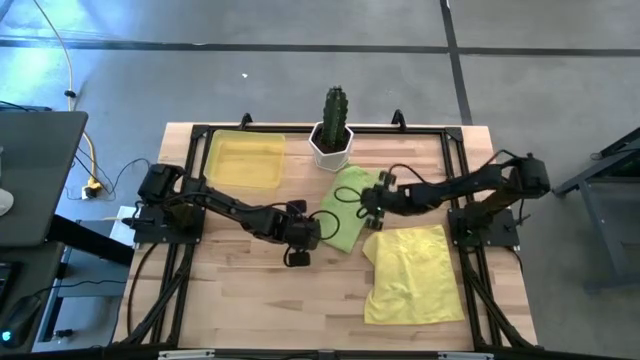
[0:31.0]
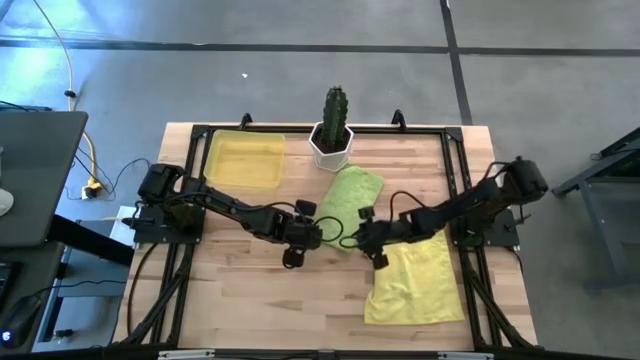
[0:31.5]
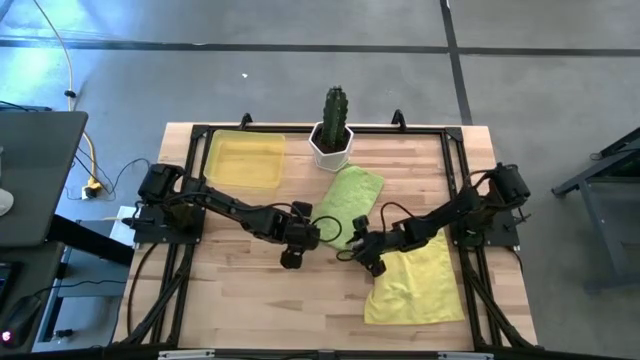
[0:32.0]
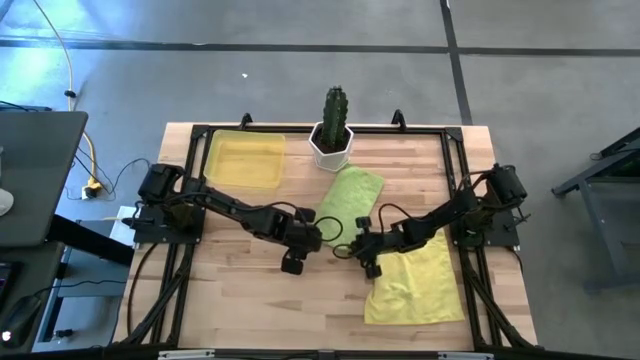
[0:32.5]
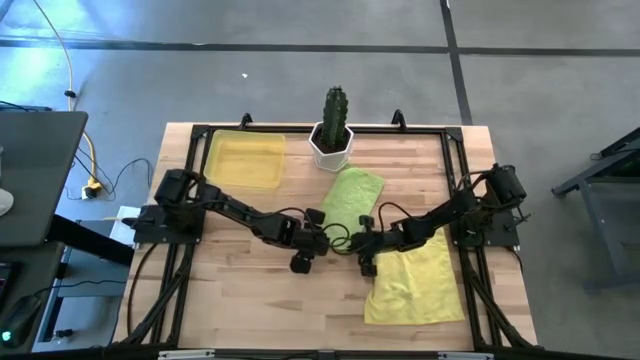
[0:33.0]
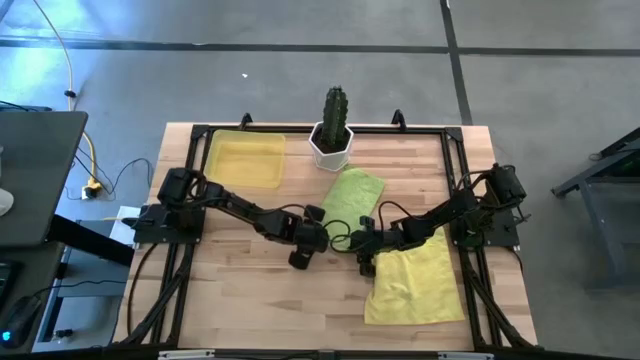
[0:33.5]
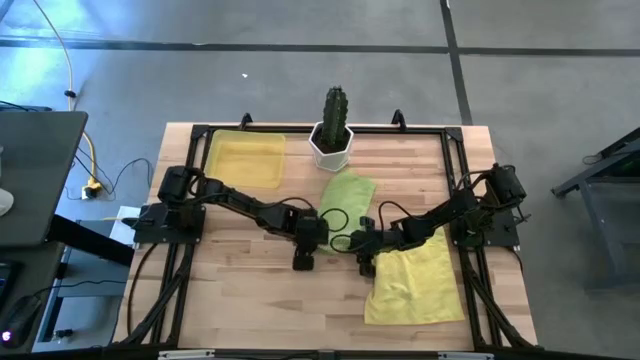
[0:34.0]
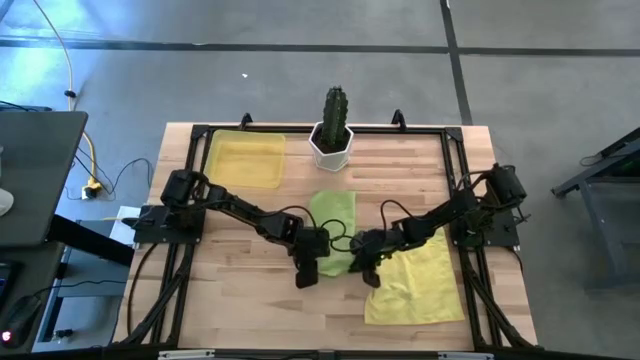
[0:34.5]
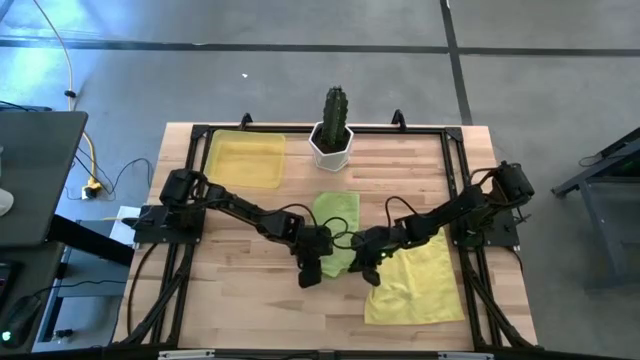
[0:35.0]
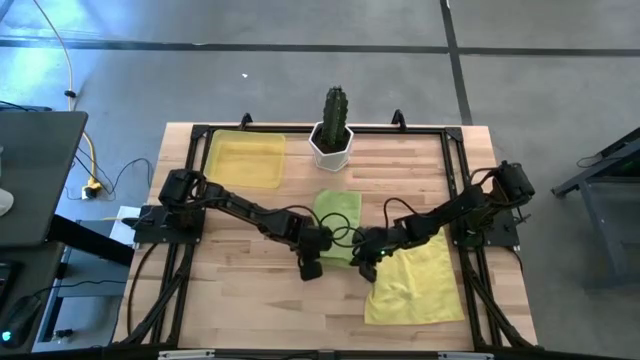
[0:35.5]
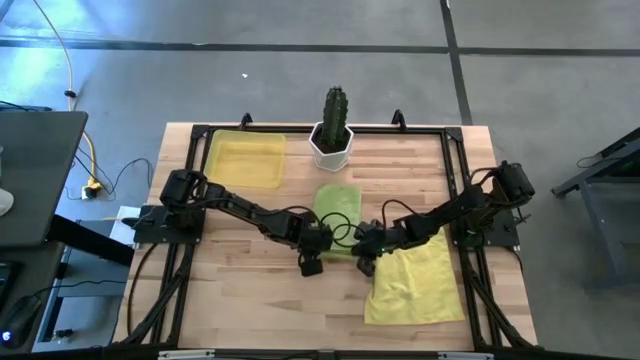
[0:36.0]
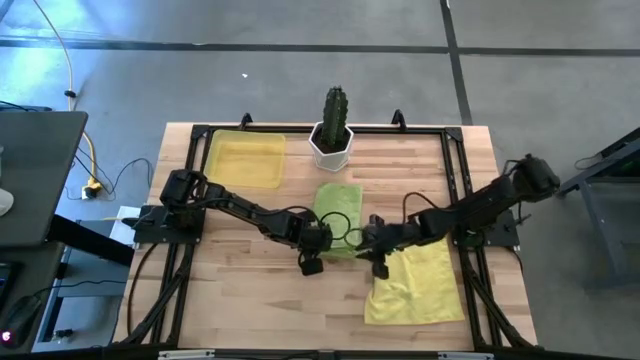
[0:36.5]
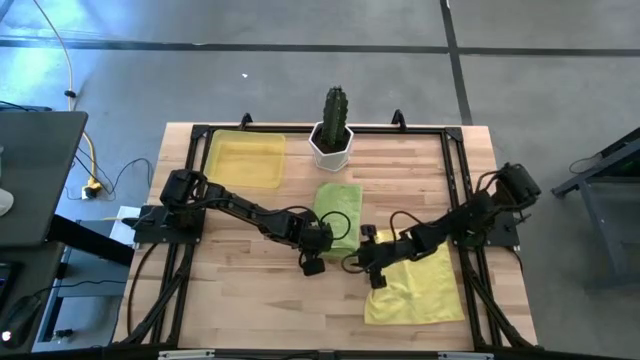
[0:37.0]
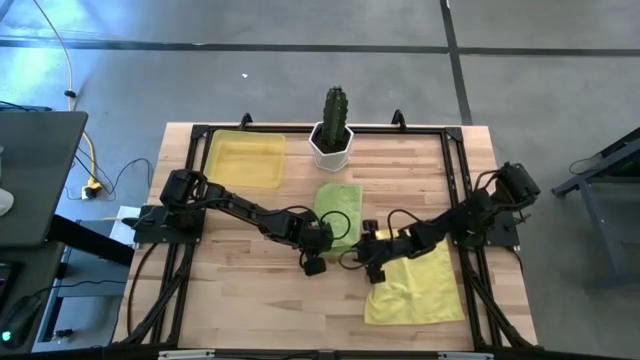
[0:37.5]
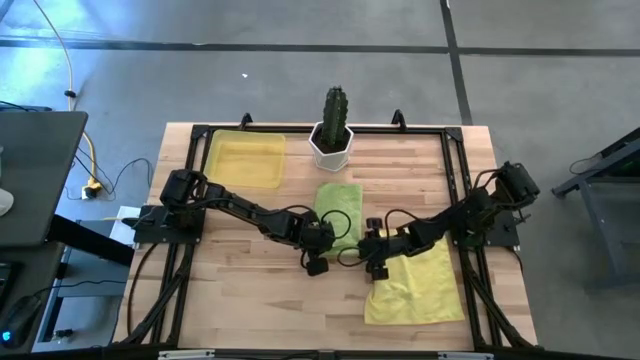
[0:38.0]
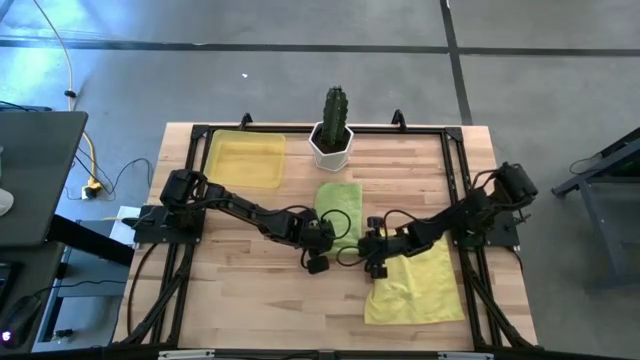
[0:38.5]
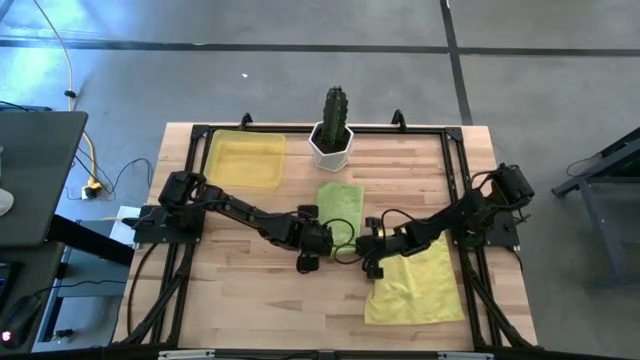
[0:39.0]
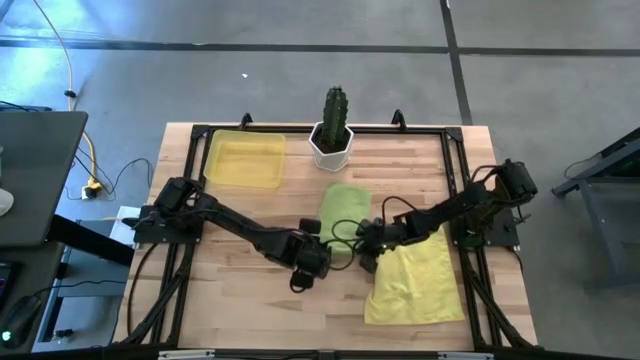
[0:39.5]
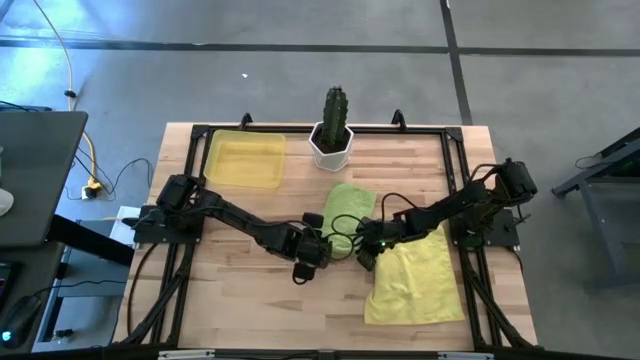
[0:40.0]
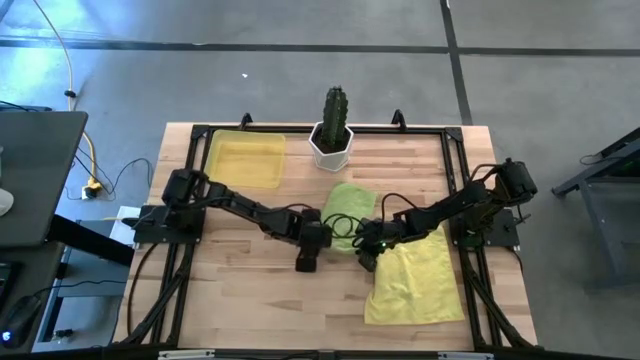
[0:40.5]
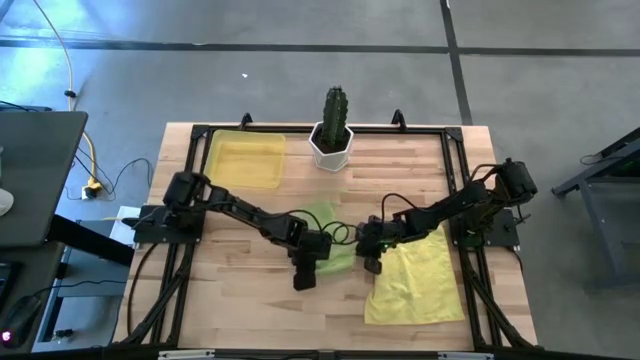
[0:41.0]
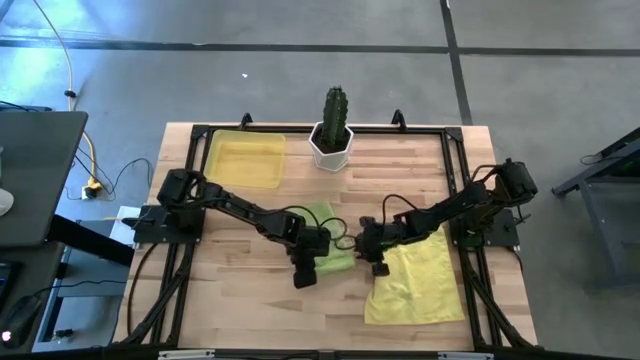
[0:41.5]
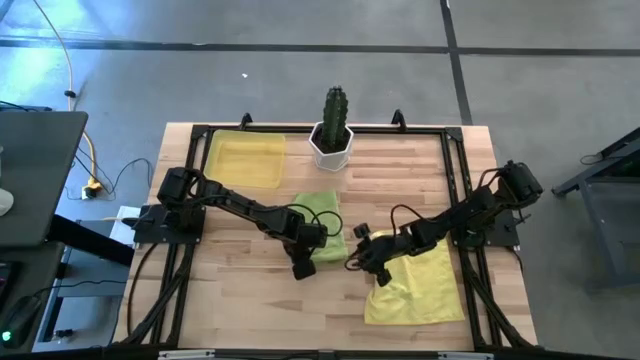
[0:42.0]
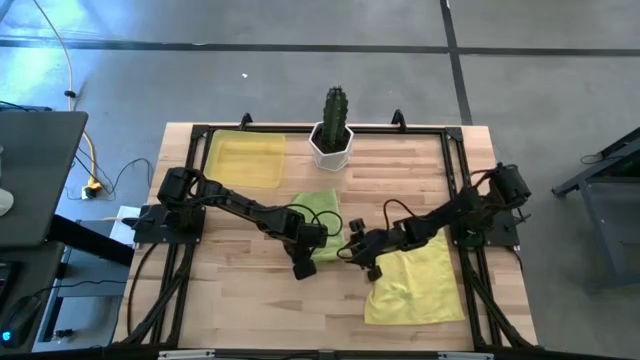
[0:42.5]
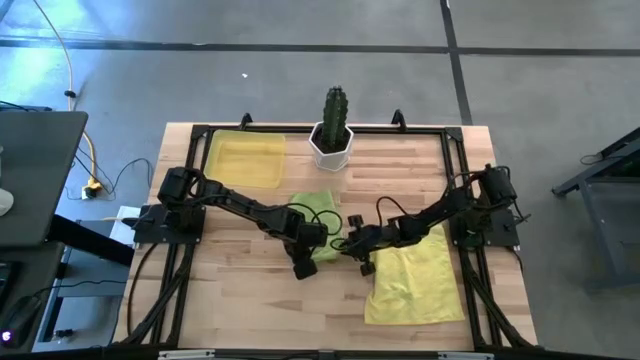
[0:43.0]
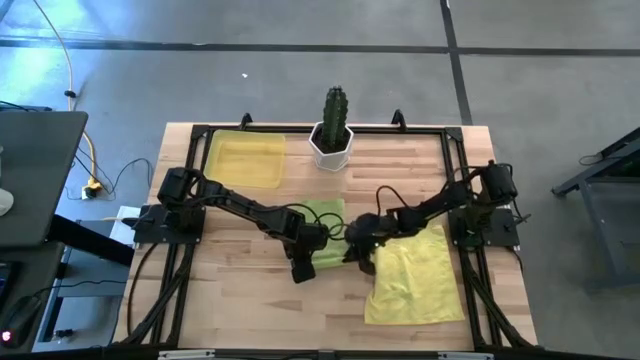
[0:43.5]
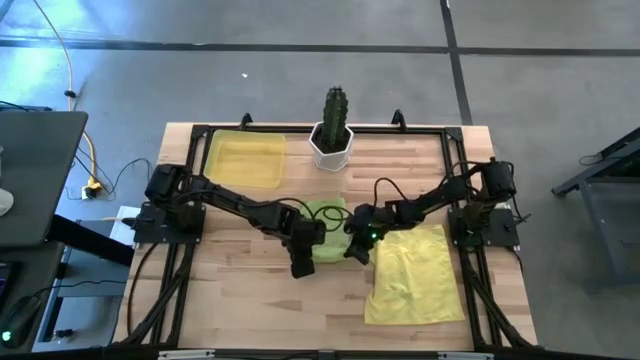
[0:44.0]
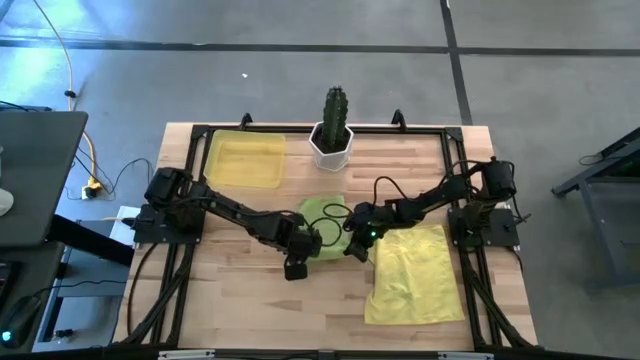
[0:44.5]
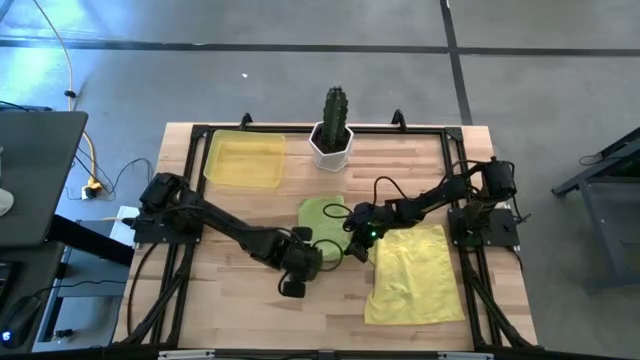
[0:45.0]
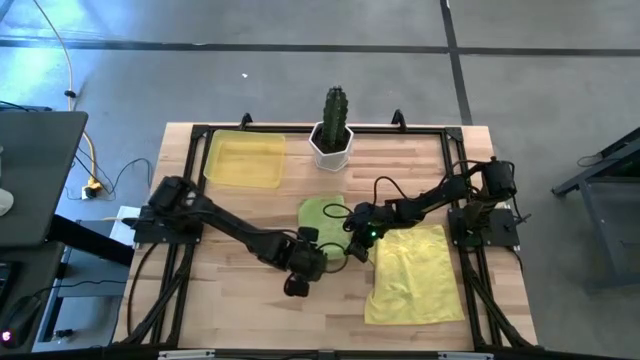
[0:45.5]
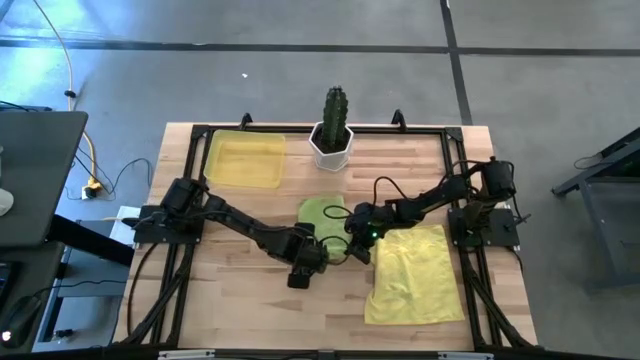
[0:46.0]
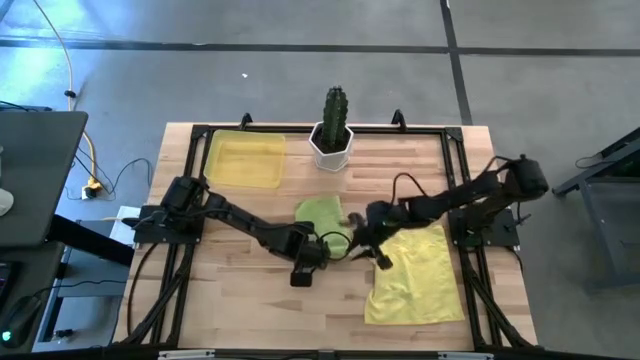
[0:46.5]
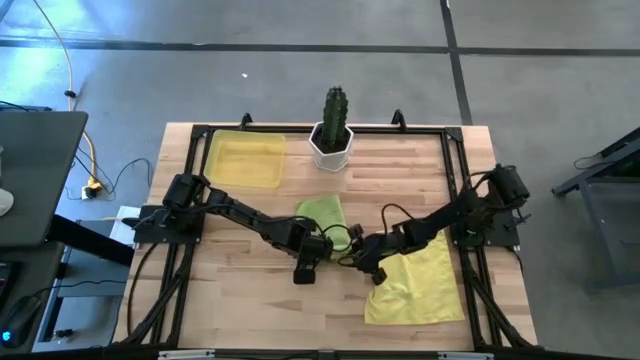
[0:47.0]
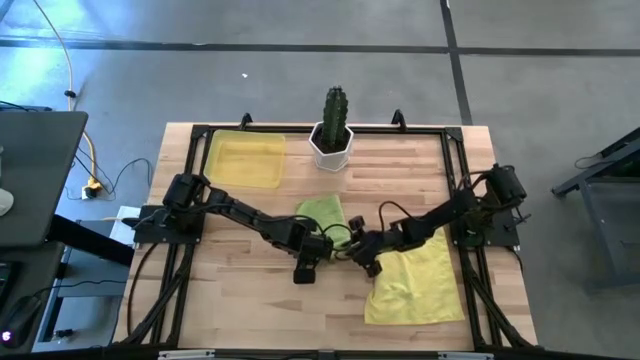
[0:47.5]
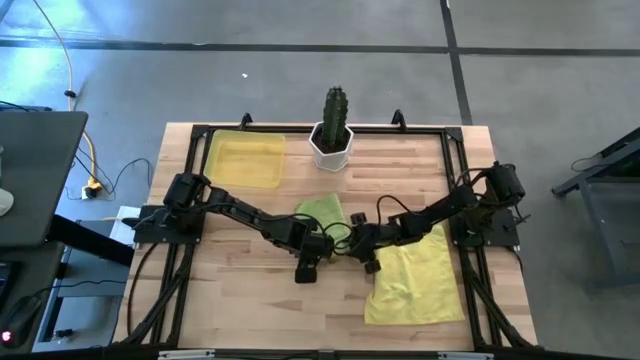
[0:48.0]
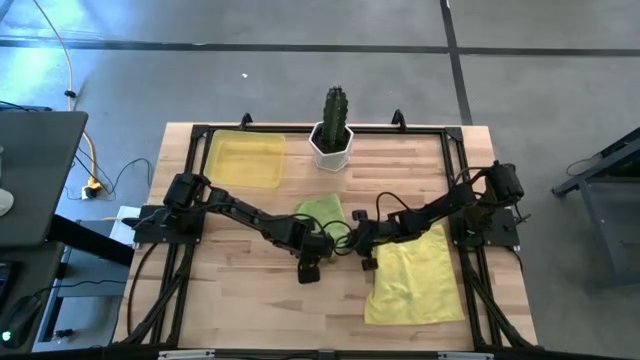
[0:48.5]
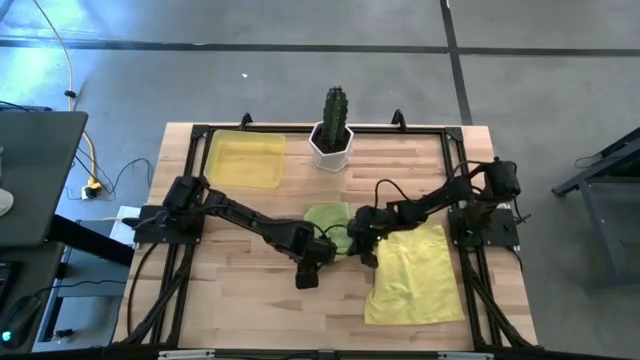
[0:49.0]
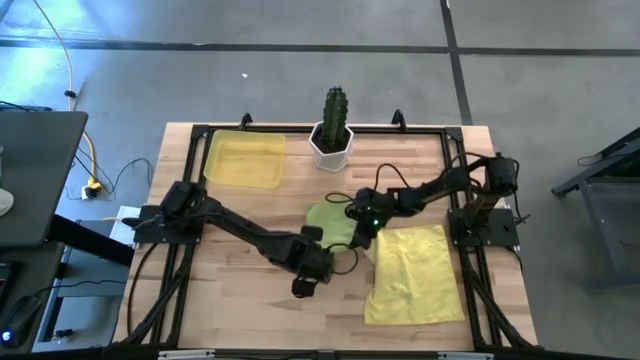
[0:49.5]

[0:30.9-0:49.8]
Task: Roll microfiber towels into tight, uniform cylinder then place into a basket
Roll the green microfiber towel

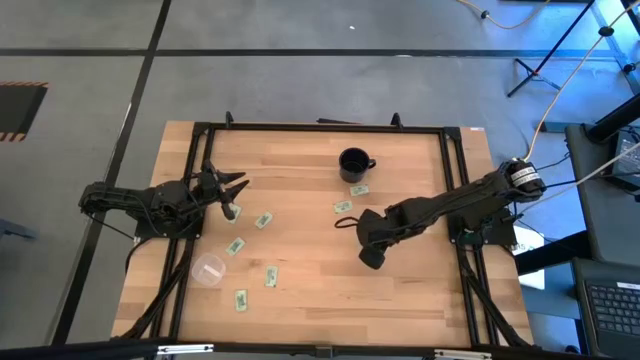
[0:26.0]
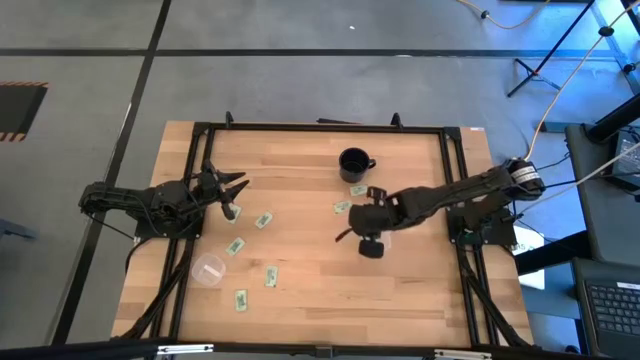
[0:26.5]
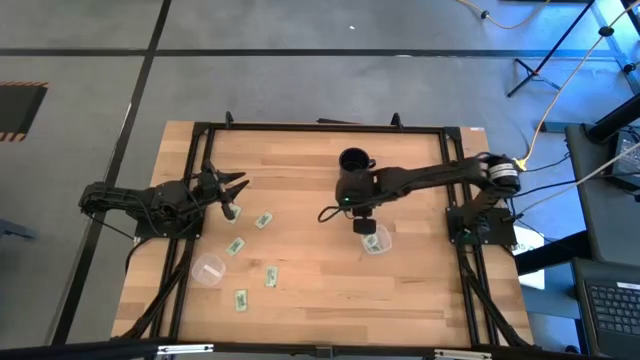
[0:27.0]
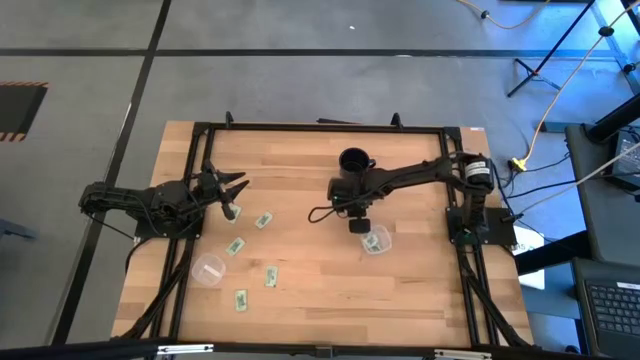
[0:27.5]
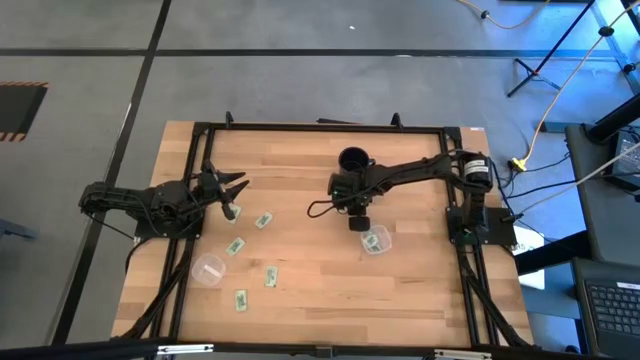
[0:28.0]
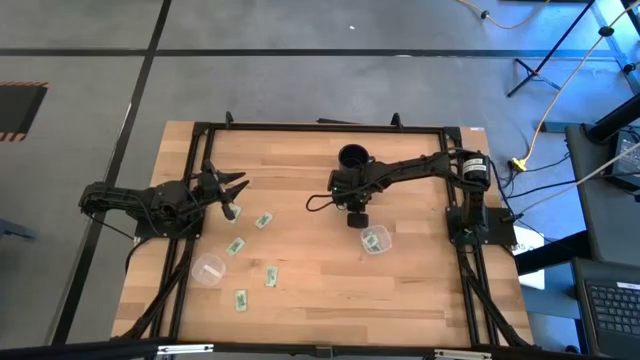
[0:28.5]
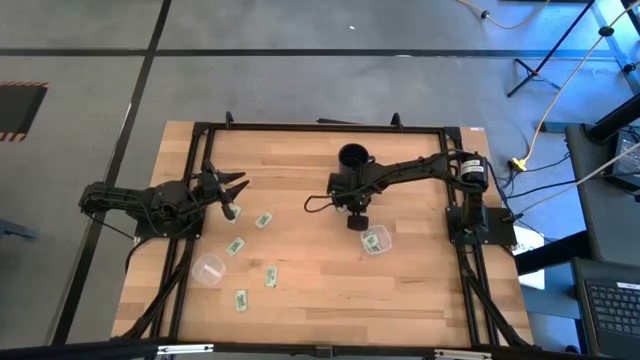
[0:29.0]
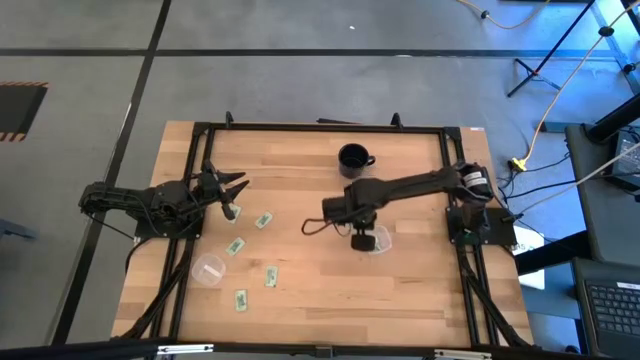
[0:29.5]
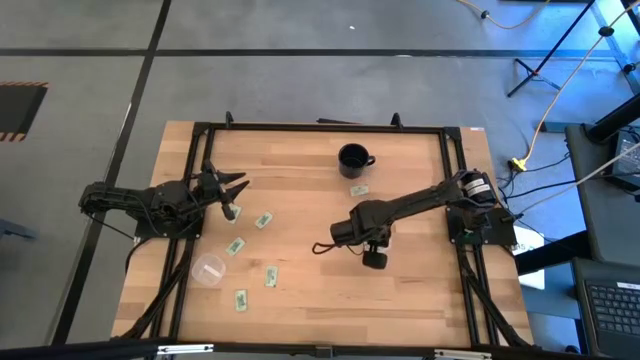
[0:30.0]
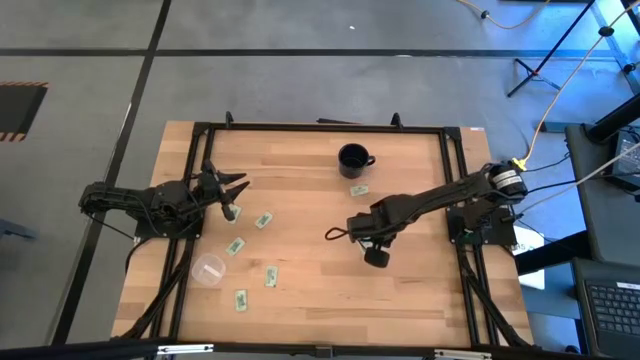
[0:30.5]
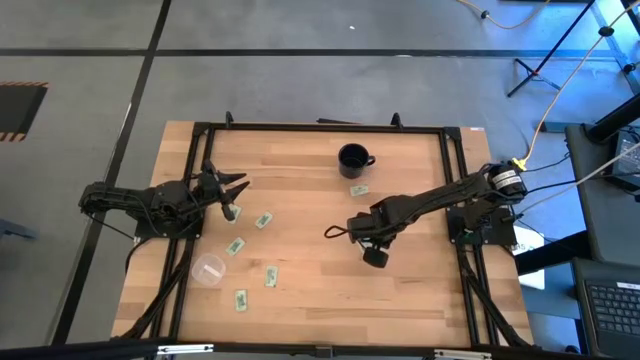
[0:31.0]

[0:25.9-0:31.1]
Task: Pick and place Stevia / Truvia into bins
Put the stevia packet into the right transparent container
